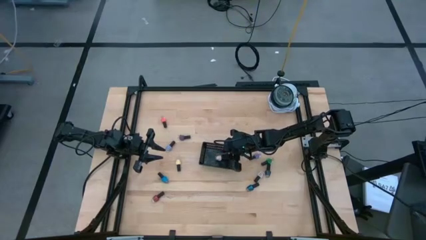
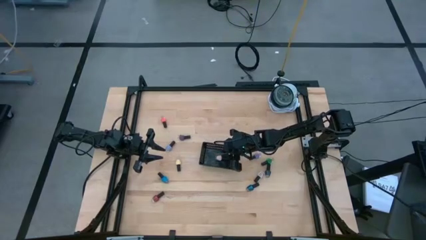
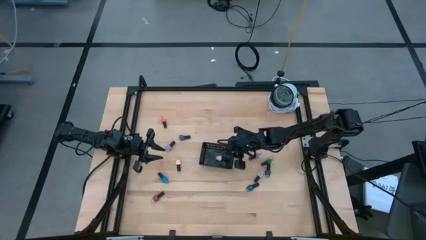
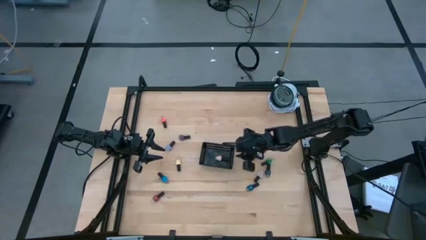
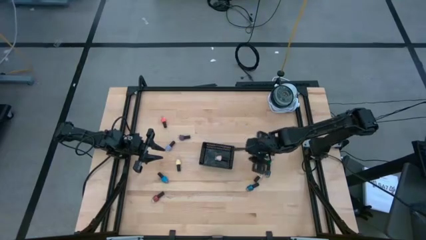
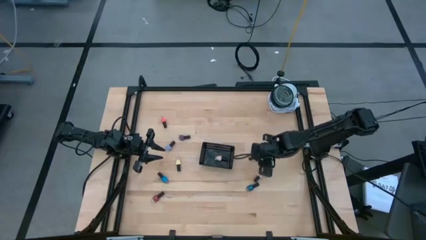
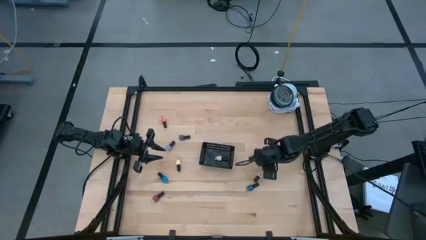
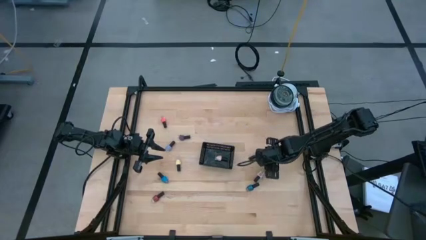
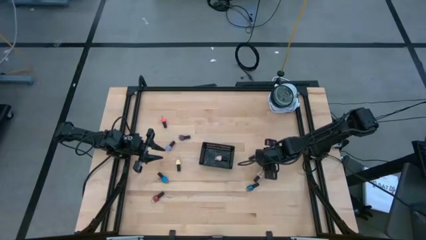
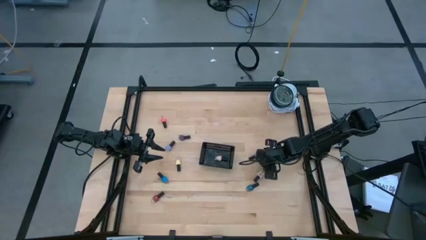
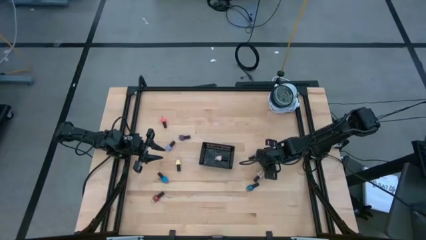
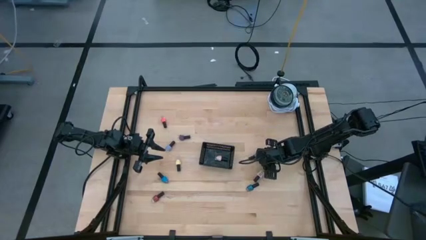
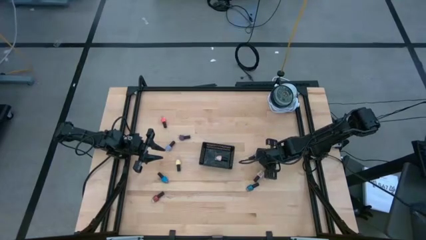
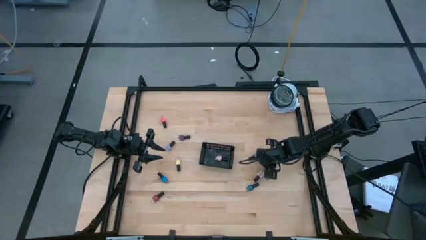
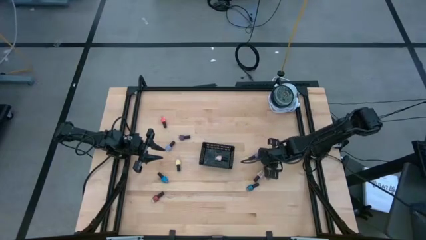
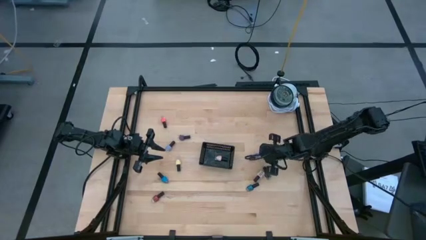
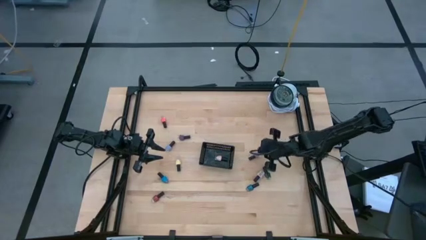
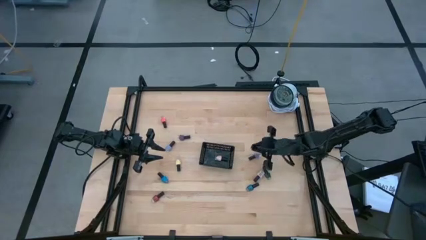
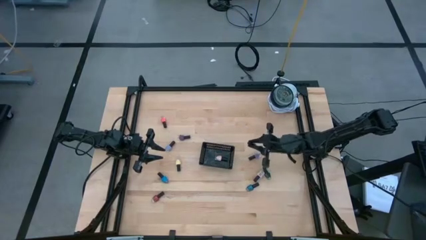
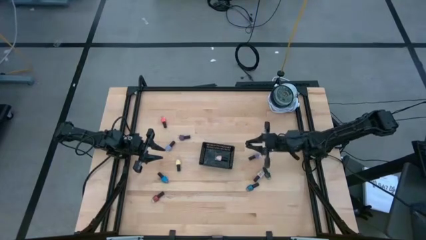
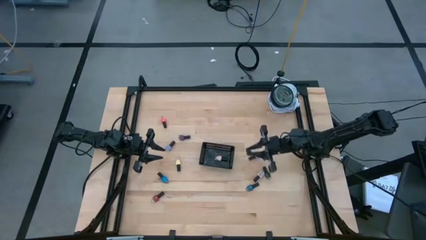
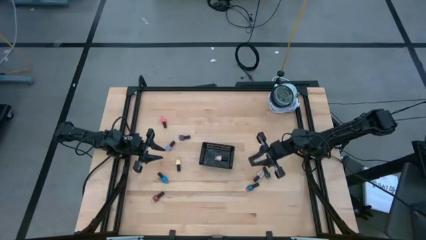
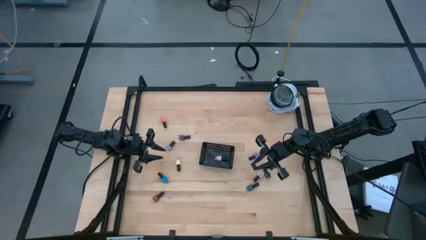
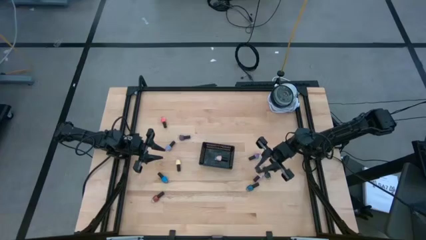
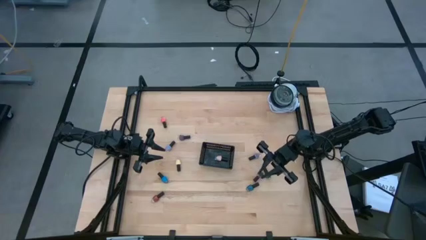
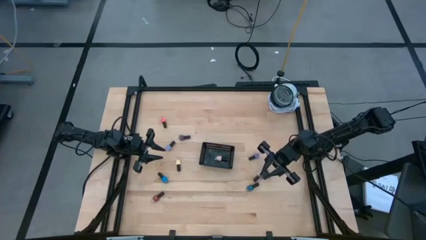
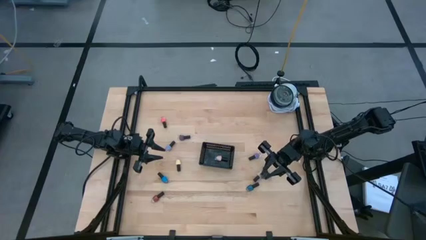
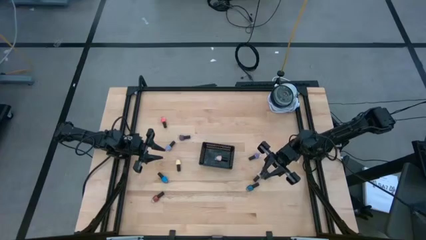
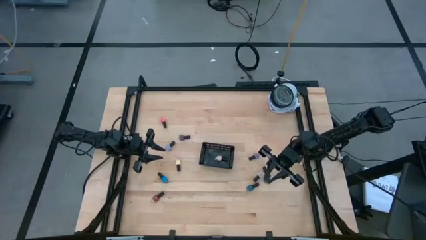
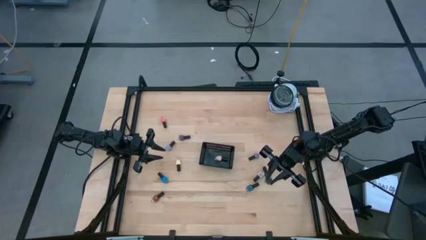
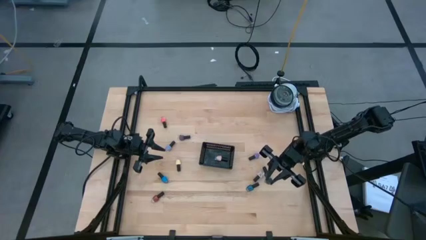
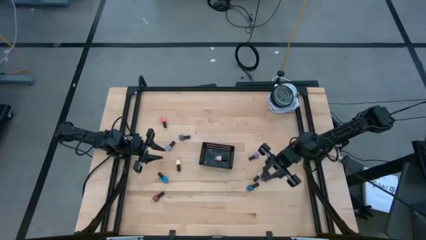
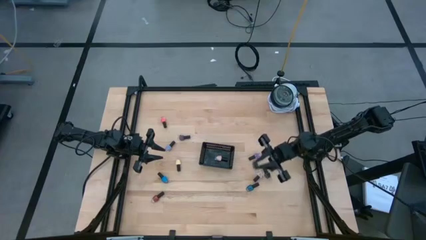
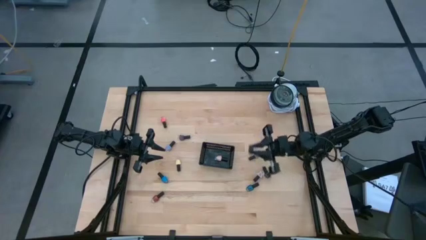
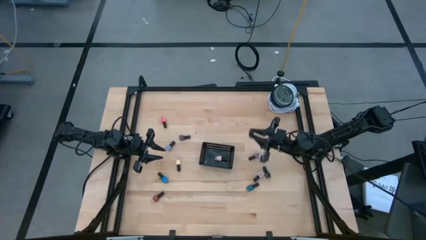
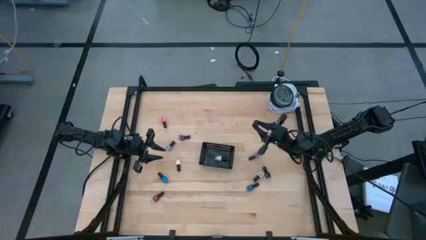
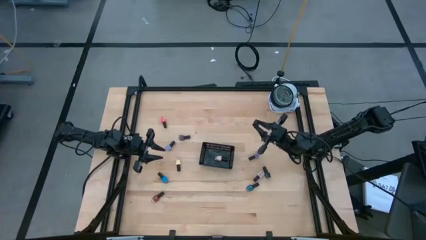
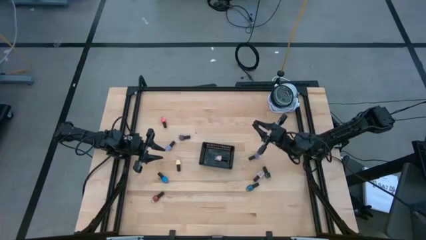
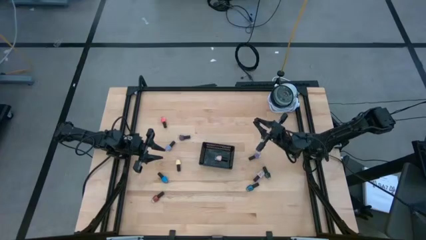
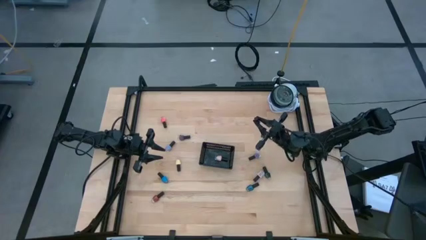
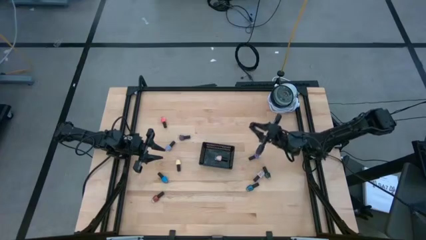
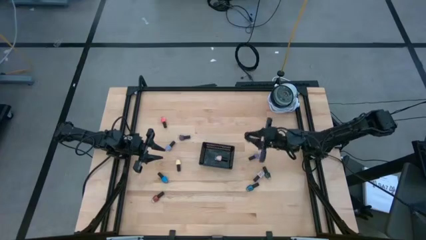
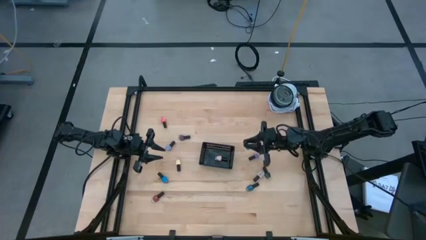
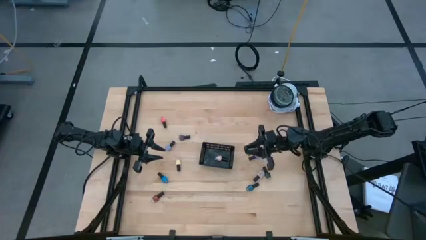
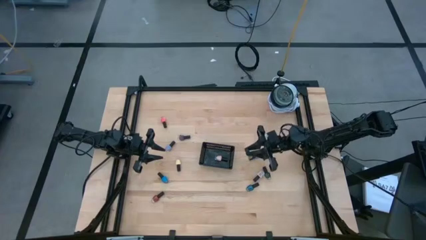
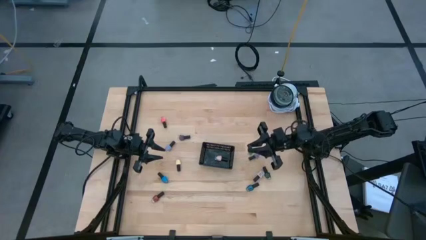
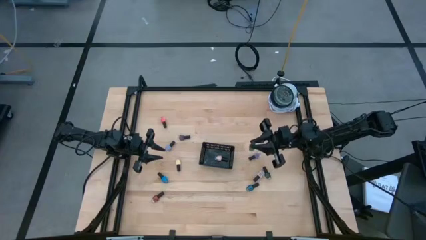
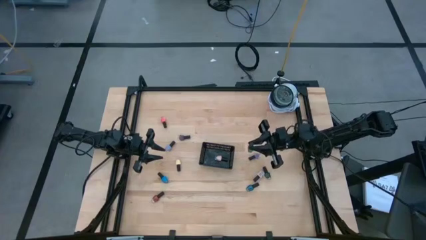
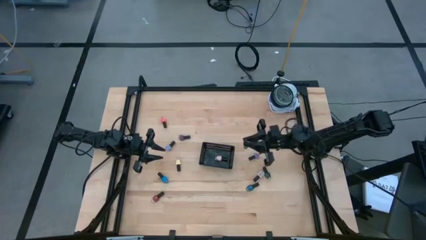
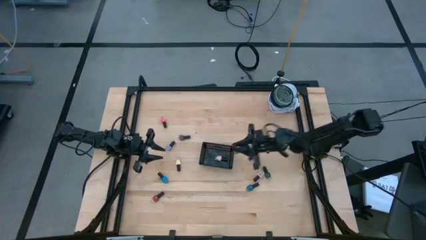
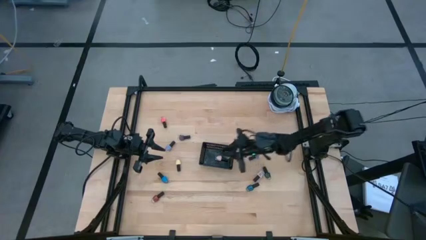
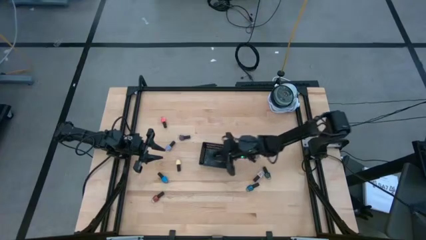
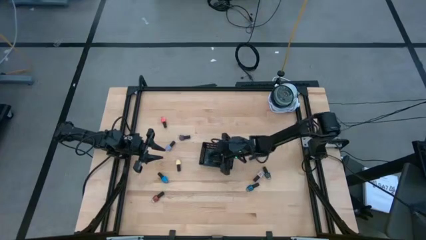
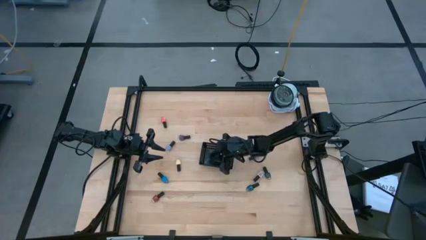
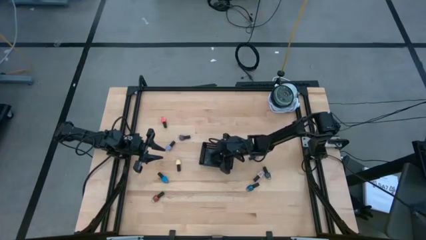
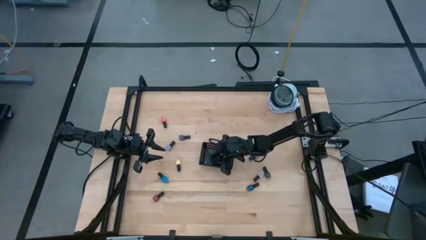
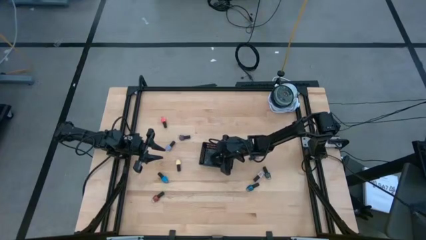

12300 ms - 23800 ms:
Task: Pick & Place Nail Polish
Put the green nail polish into the black bin

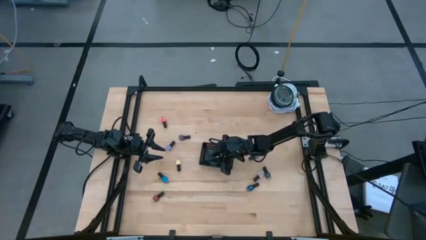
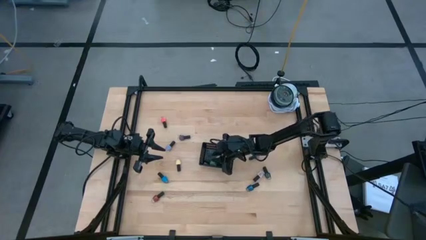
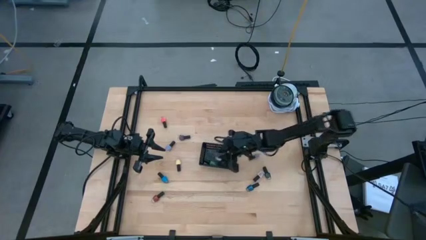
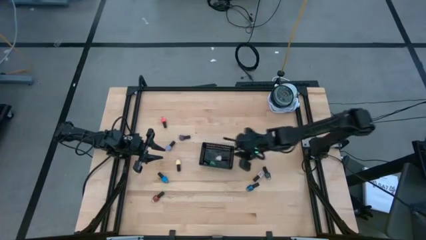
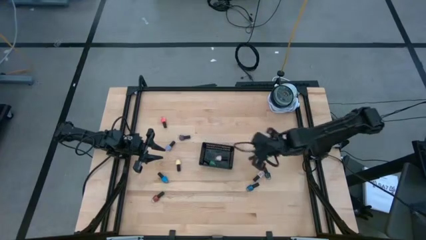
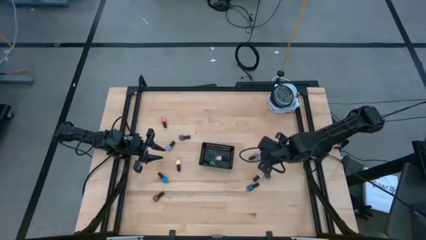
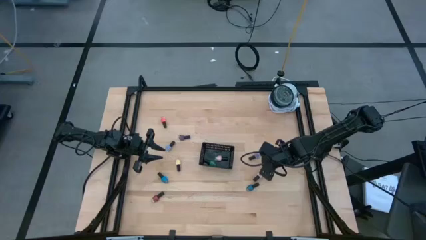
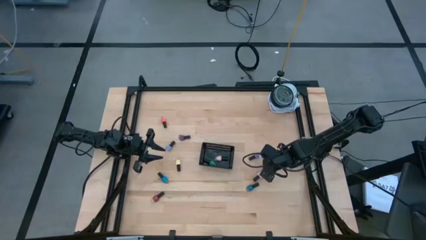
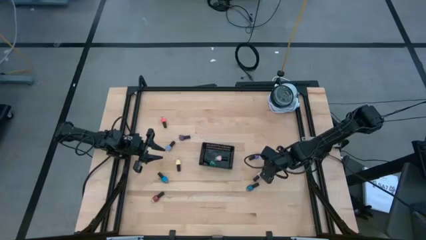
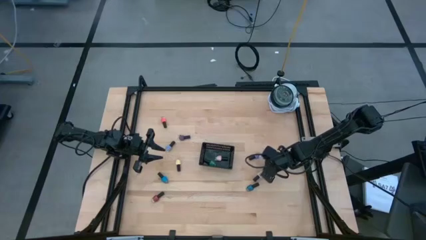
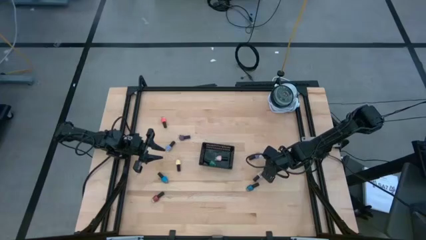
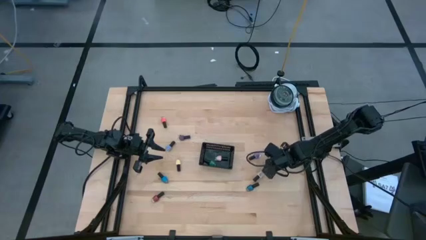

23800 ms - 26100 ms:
Put the dark green nail polish into the black bin

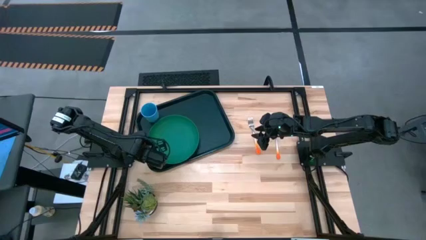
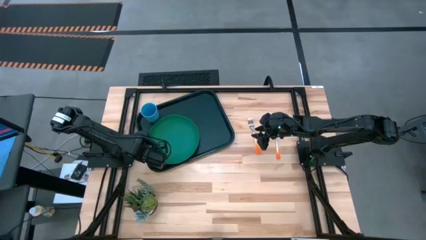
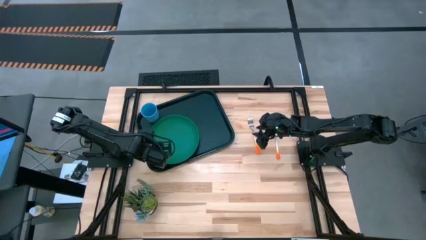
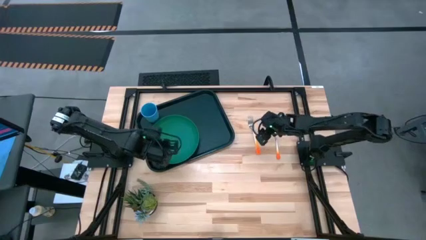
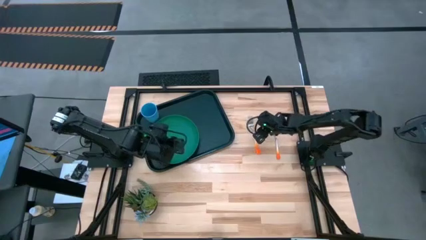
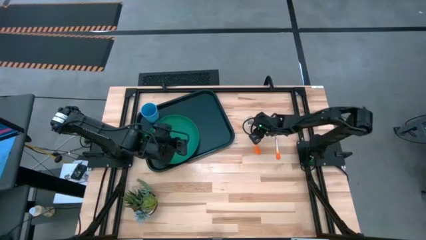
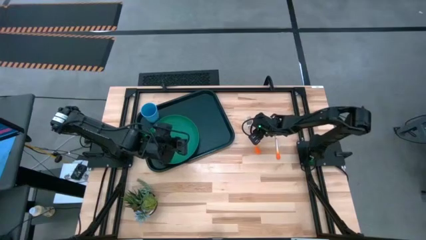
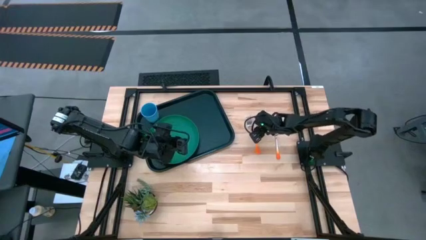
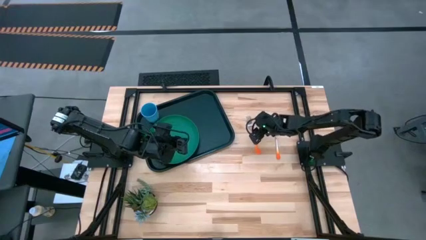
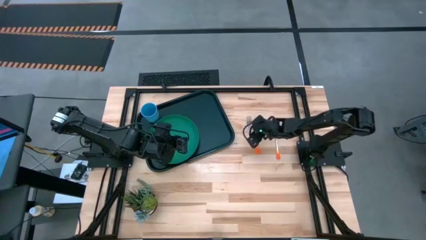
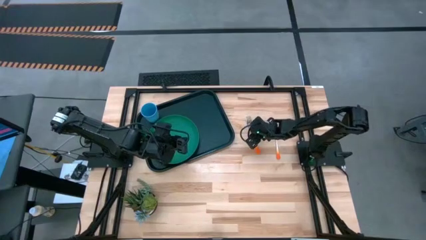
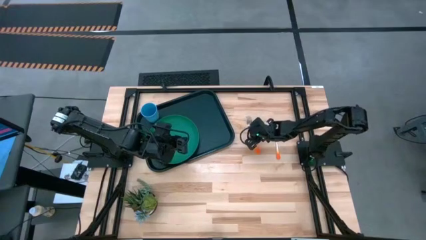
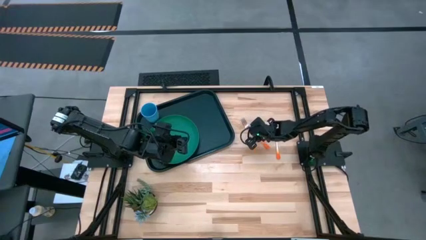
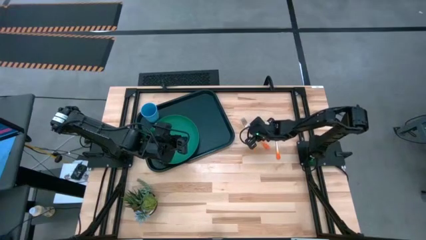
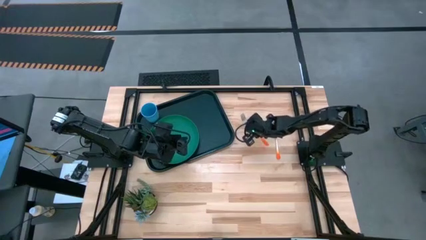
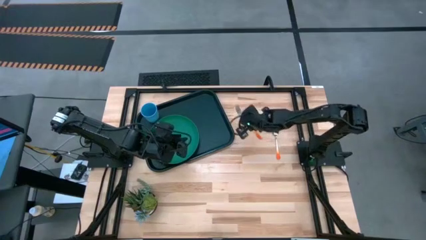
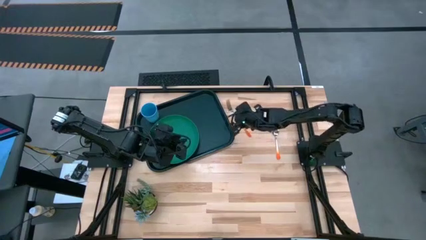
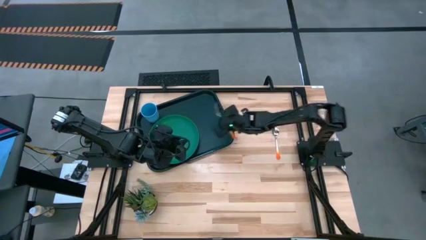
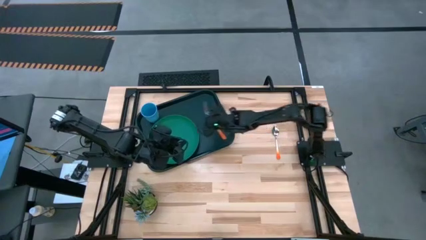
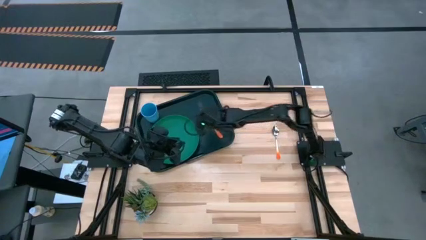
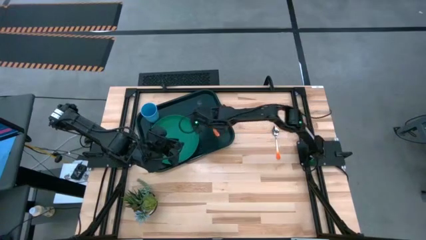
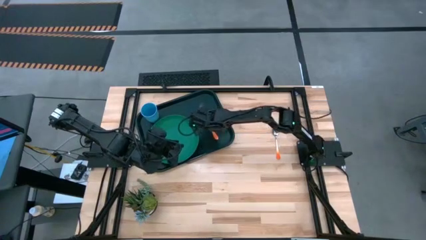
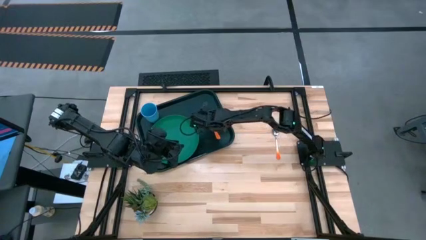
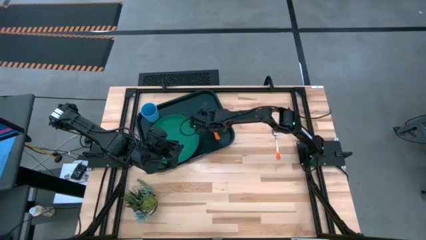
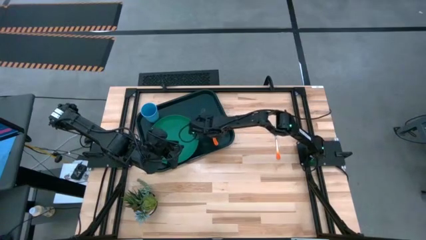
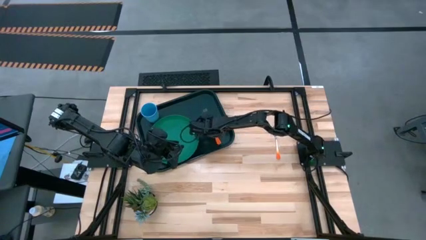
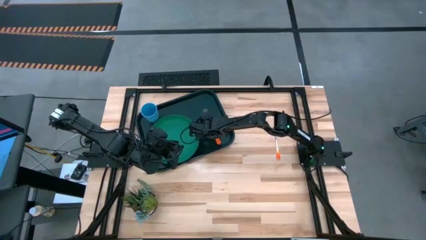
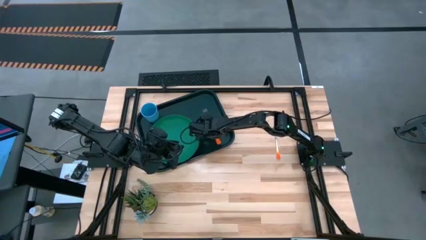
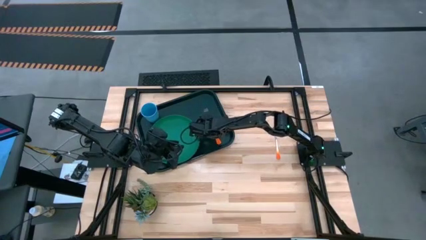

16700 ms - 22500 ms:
Task: Pick and place plate/cup/fork/spoon on tray
Put the orange fork on the black tray to the right of the green plate
